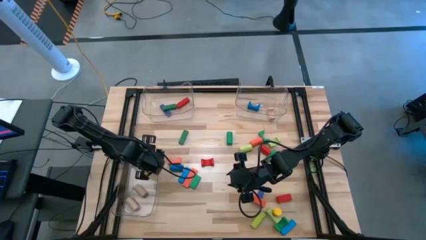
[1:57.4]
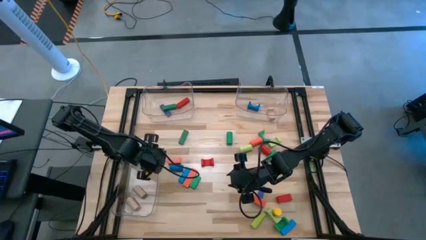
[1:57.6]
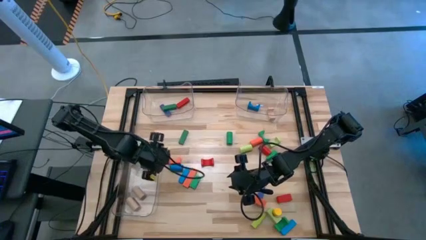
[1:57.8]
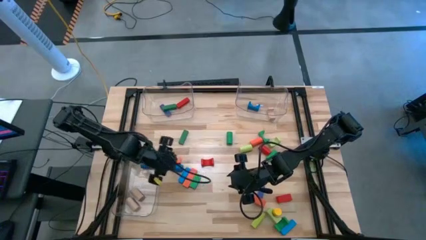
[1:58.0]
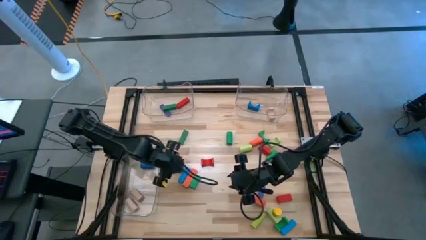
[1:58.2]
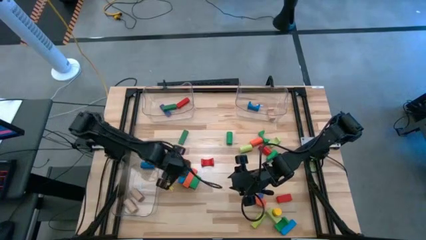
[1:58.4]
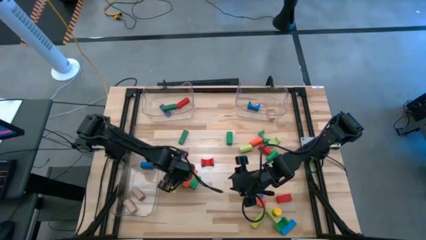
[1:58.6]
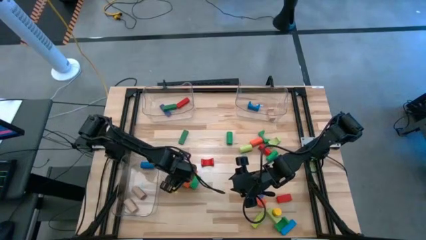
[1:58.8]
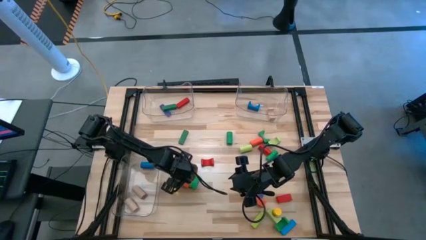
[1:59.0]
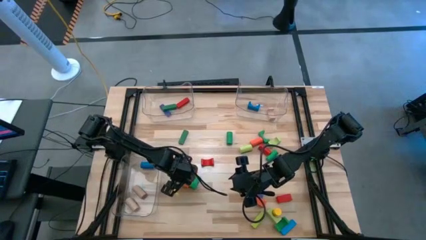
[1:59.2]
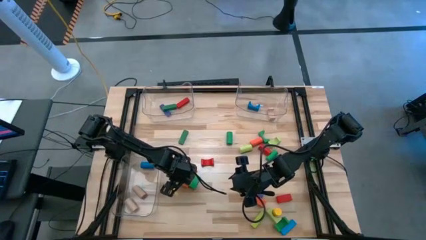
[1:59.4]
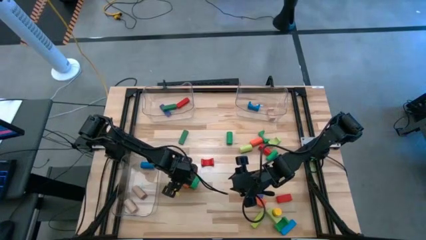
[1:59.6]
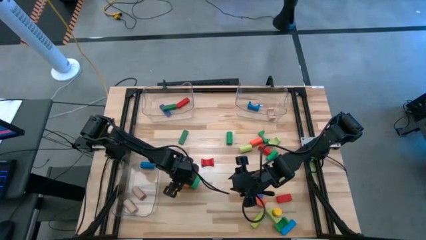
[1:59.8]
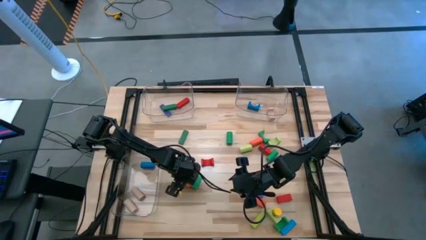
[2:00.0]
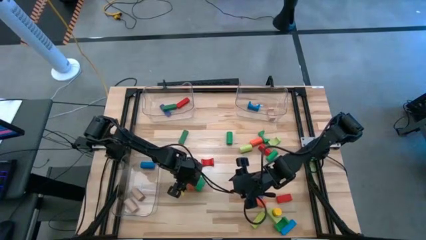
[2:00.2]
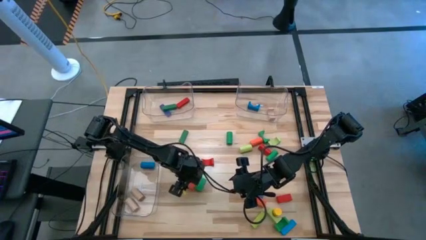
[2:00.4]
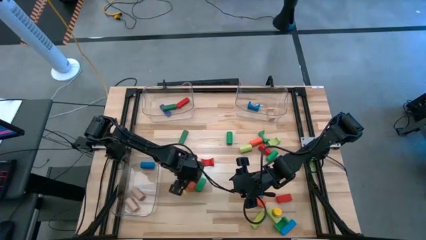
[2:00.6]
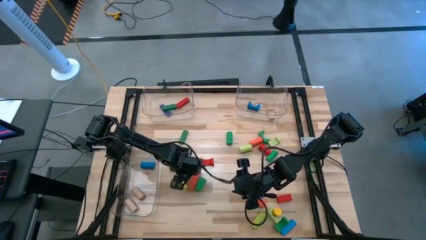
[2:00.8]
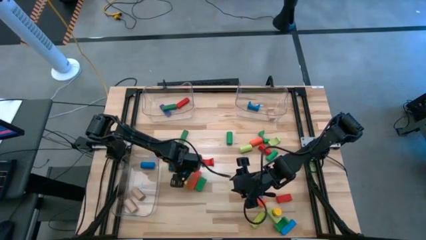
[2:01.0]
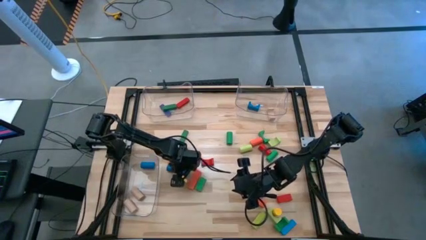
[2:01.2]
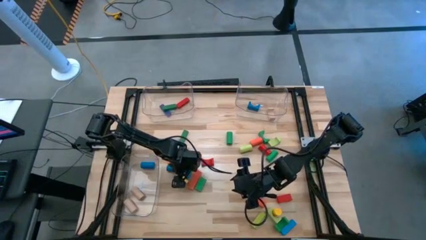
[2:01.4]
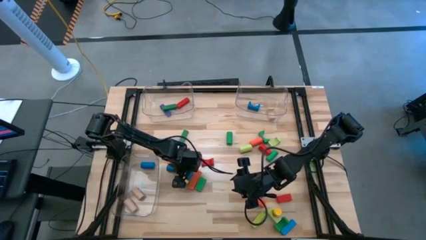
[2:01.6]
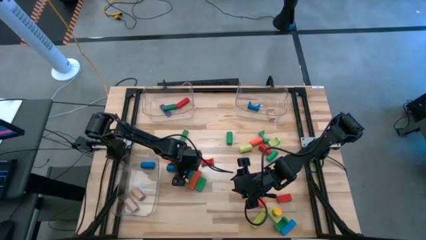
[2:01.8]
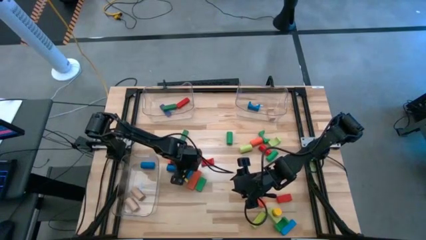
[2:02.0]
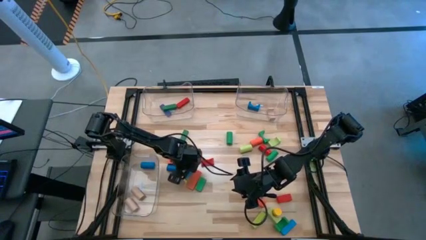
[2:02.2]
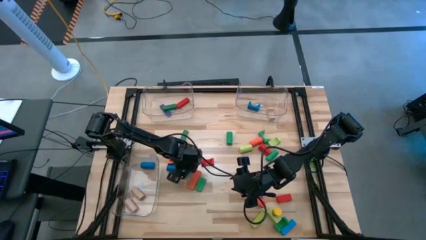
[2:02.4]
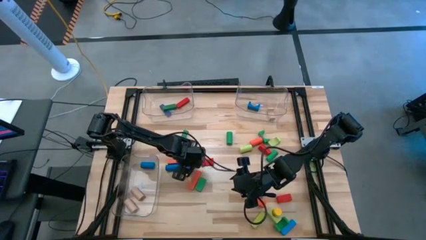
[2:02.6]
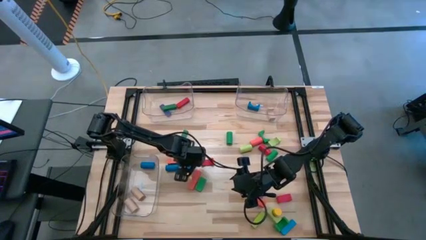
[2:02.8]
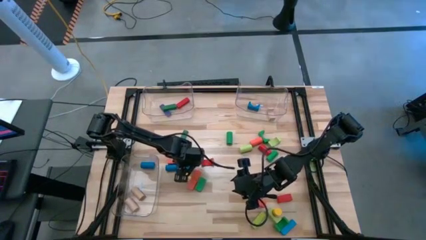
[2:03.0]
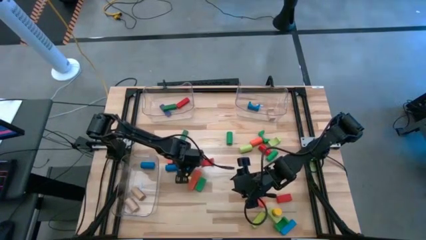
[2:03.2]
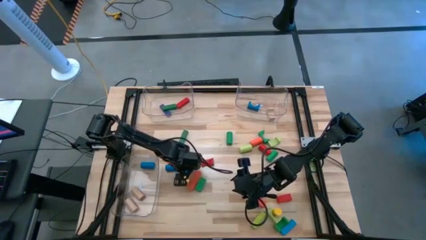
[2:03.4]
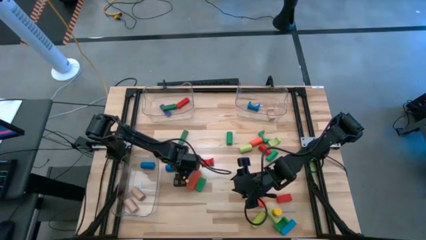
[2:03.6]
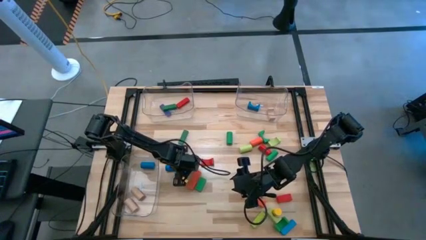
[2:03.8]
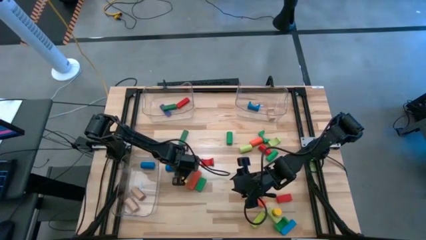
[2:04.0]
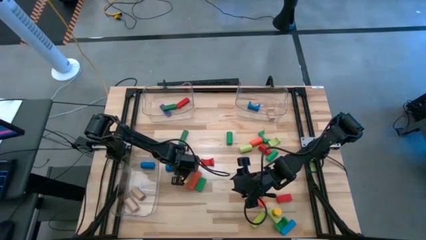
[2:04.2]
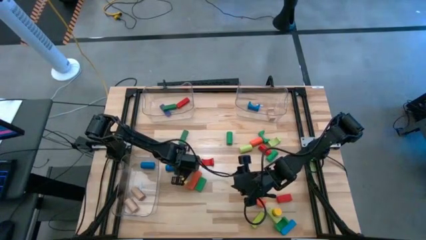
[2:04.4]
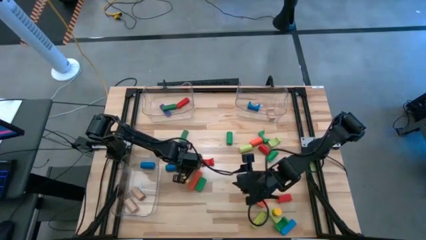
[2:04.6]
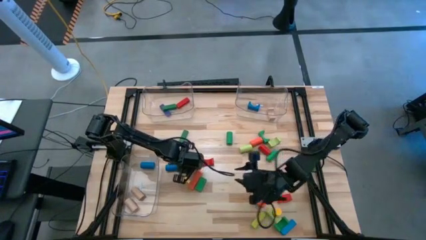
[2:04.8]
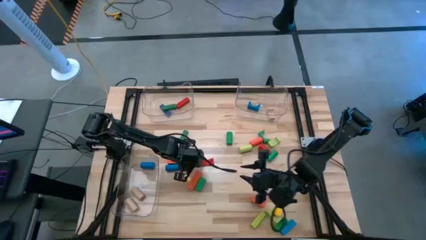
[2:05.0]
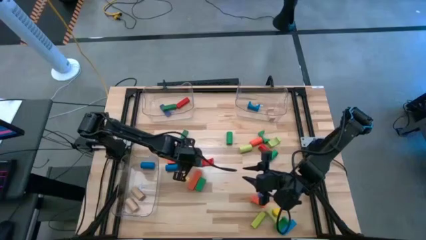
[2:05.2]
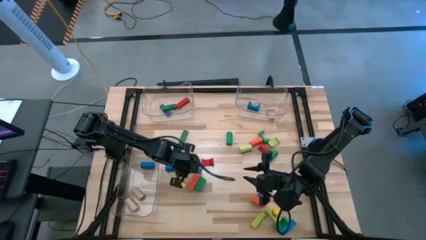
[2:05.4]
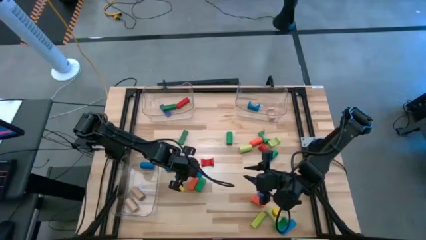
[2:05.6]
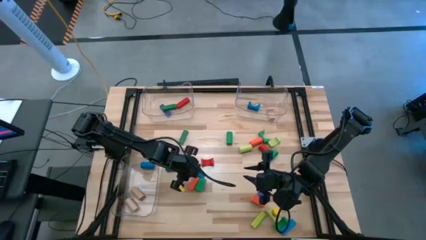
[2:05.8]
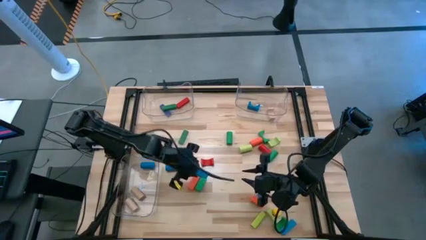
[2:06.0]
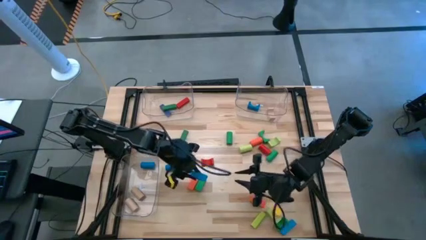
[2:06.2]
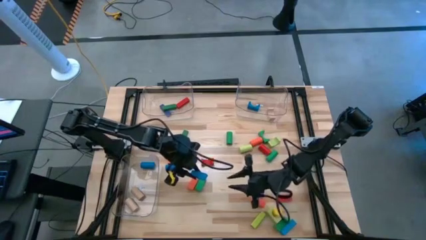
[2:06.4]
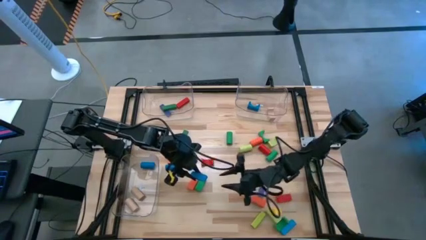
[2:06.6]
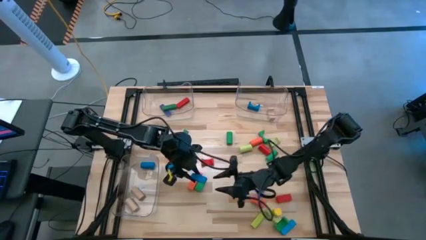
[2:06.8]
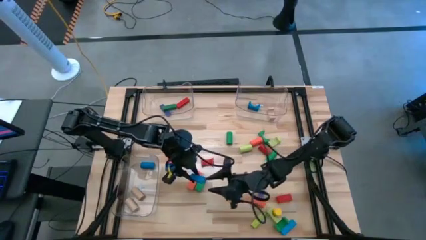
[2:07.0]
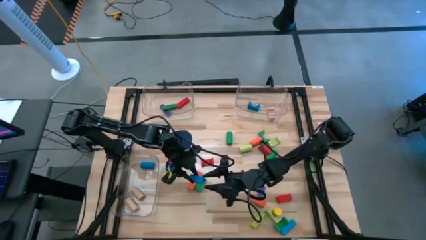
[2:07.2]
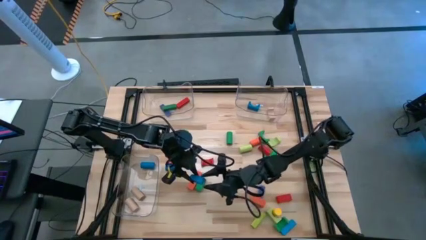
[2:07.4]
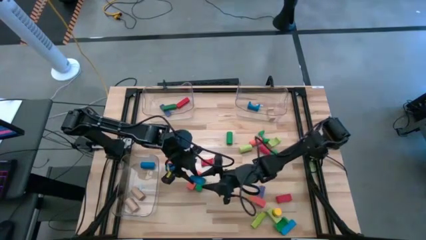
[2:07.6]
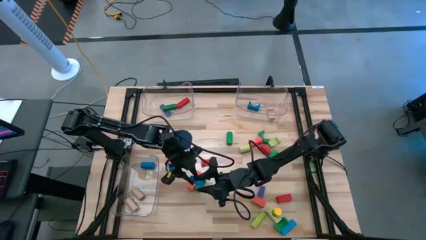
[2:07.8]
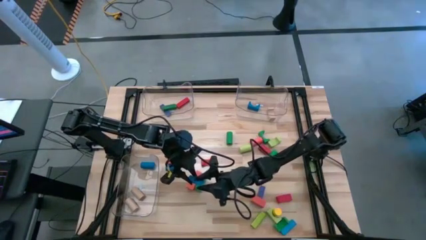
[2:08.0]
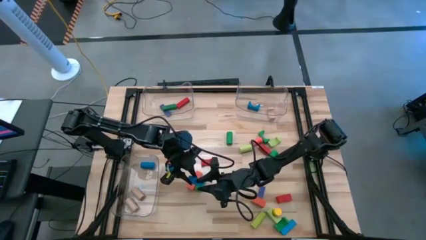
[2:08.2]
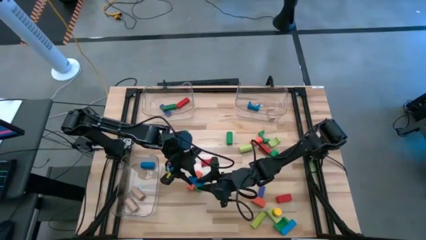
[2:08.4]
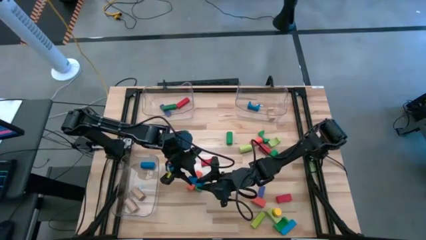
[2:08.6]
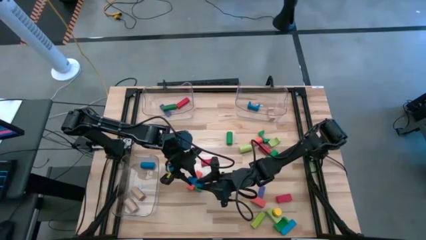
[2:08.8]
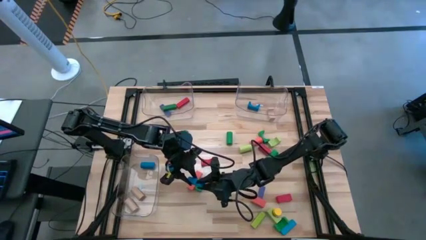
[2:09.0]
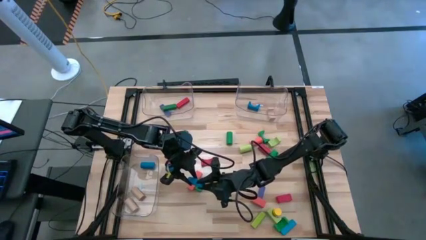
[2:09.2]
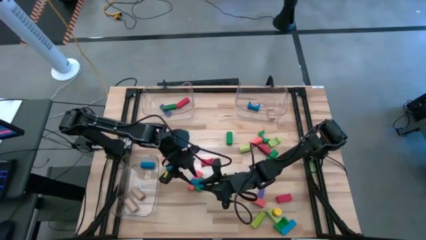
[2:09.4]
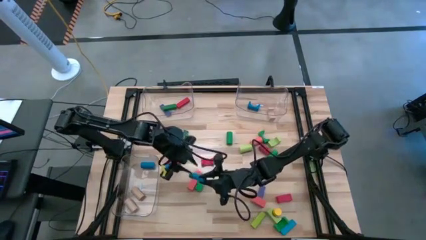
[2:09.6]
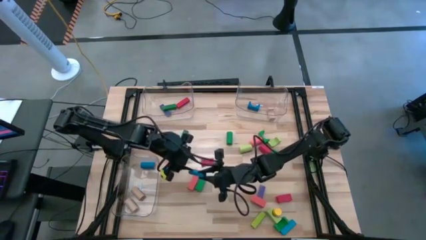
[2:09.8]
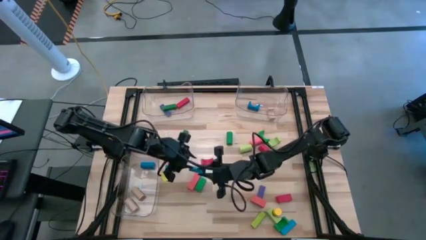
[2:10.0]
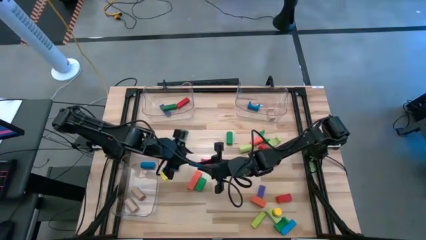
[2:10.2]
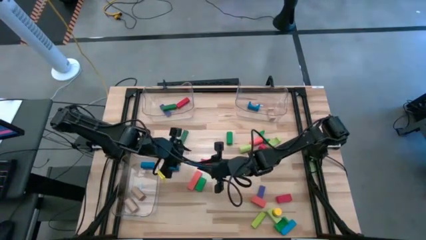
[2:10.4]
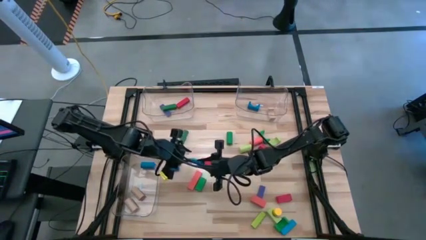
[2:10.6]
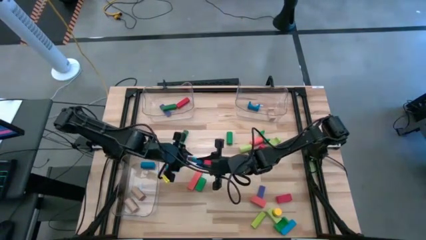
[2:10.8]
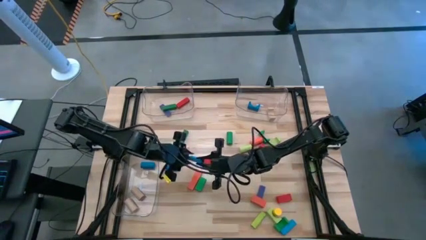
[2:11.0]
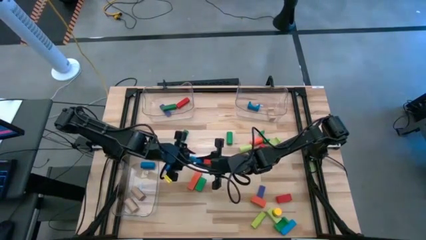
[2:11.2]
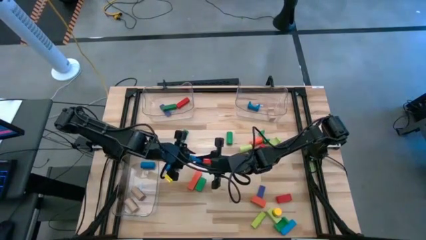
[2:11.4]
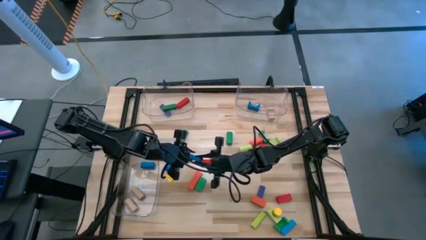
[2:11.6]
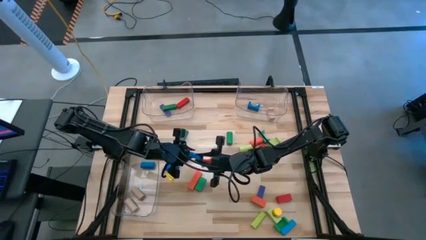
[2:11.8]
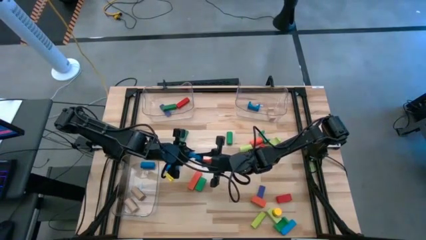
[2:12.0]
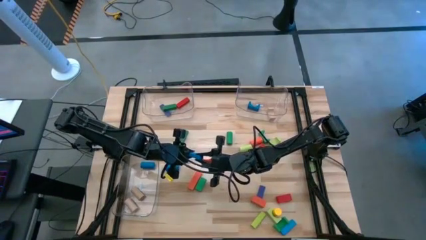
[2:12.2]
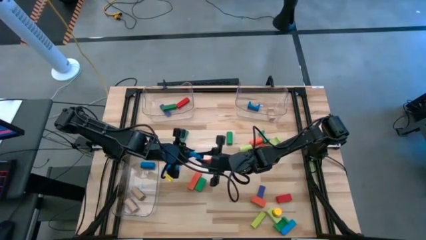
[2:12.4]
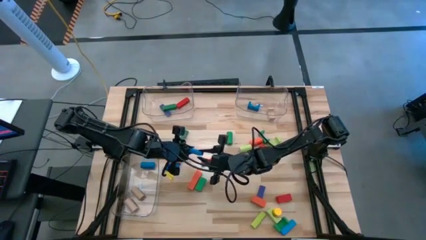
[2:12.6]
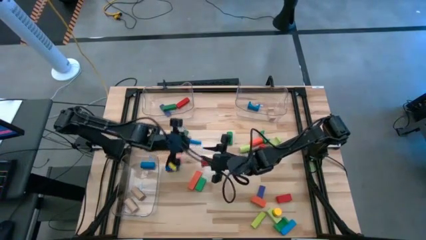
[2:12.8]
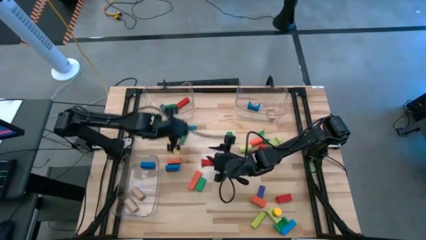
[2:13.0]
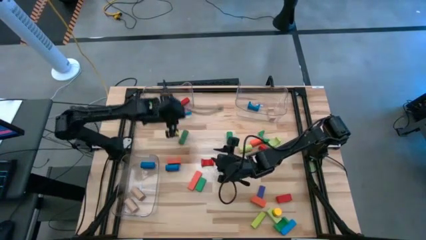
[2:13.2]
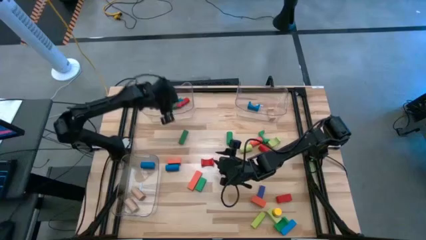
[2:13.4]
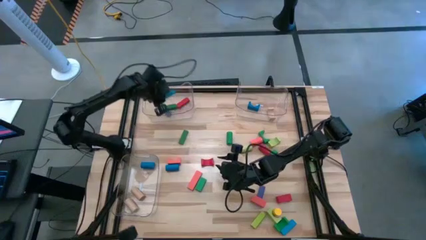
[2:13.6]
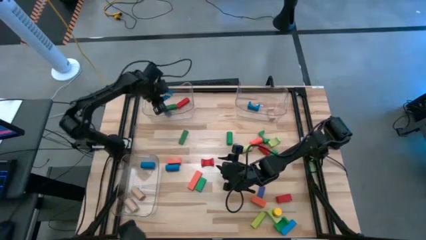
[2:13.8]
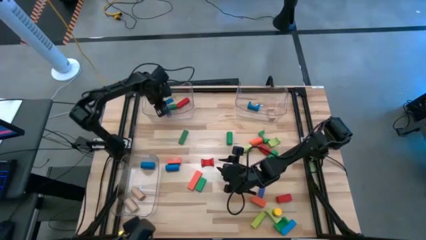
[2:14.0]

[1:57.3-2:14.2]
Task: Sort blocks by size
Put the blue rectangular block on the top left transparent bin
